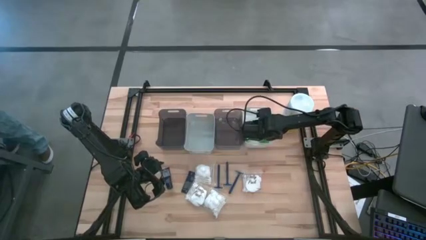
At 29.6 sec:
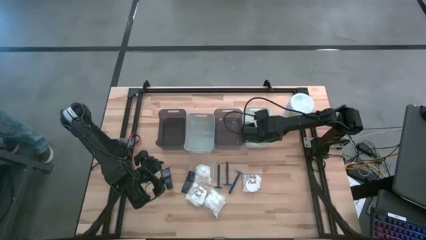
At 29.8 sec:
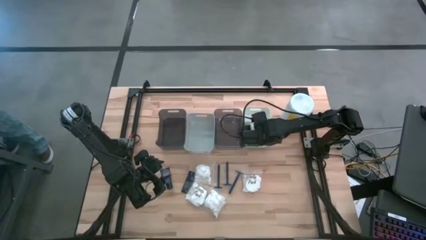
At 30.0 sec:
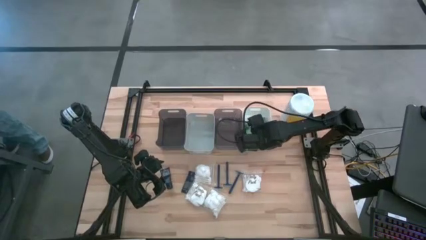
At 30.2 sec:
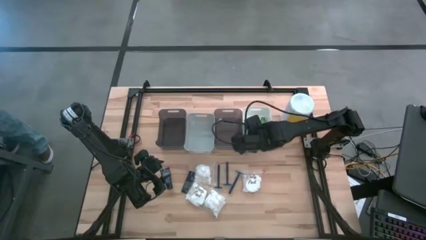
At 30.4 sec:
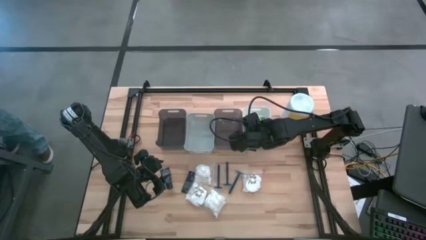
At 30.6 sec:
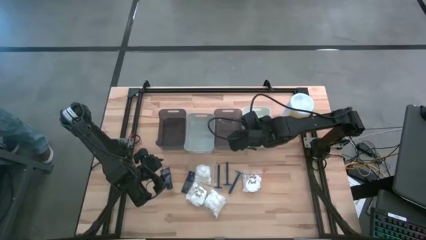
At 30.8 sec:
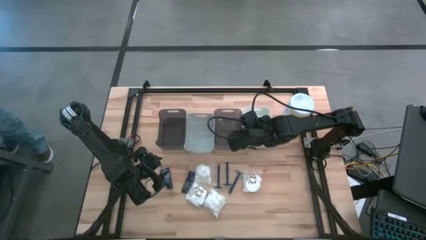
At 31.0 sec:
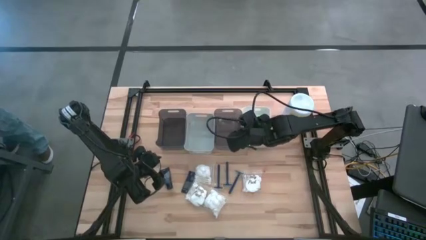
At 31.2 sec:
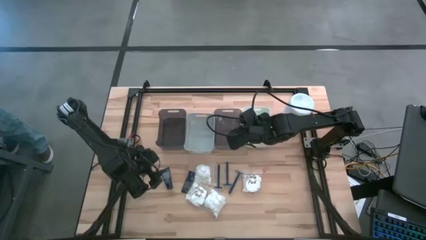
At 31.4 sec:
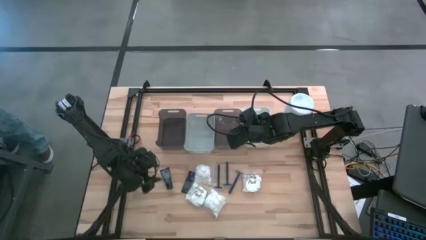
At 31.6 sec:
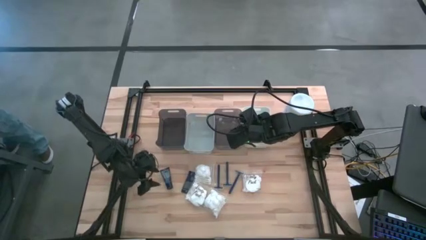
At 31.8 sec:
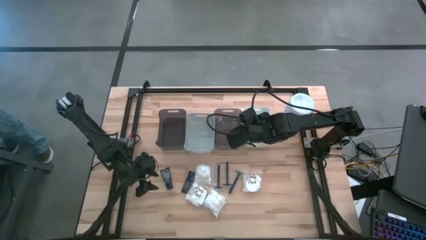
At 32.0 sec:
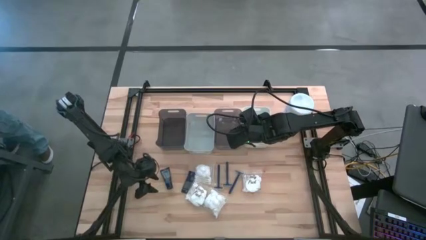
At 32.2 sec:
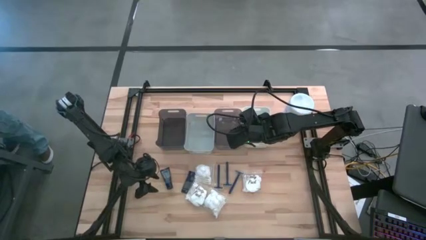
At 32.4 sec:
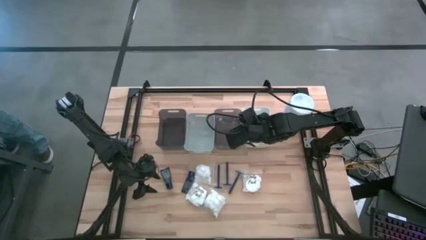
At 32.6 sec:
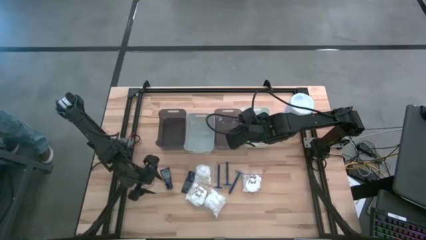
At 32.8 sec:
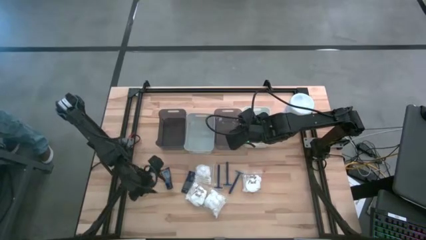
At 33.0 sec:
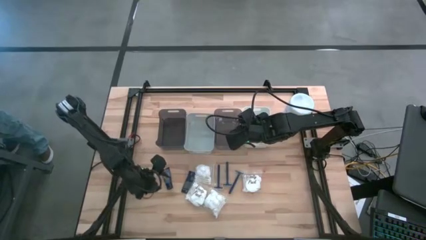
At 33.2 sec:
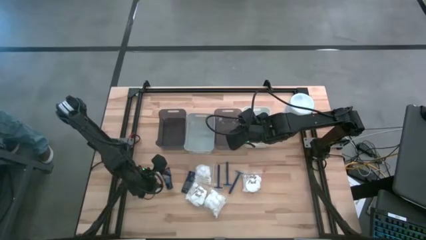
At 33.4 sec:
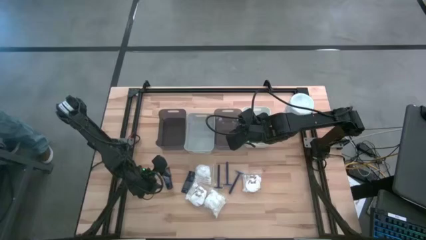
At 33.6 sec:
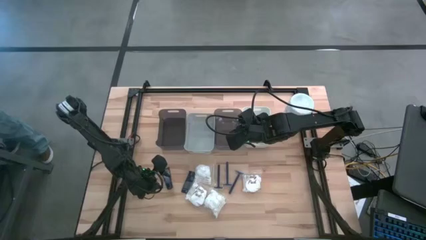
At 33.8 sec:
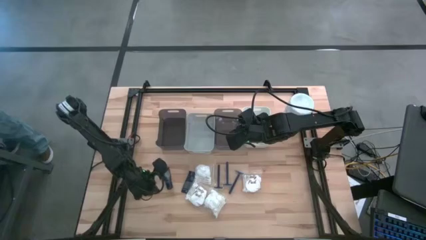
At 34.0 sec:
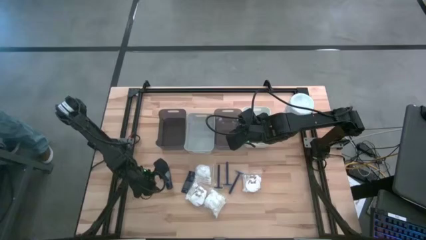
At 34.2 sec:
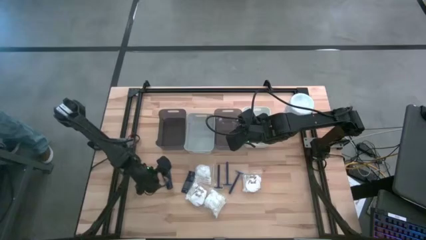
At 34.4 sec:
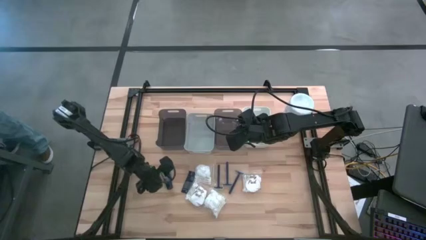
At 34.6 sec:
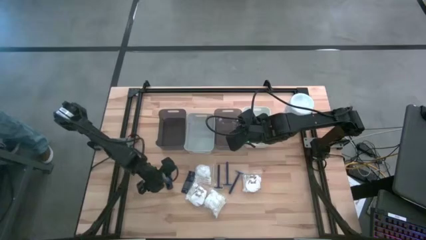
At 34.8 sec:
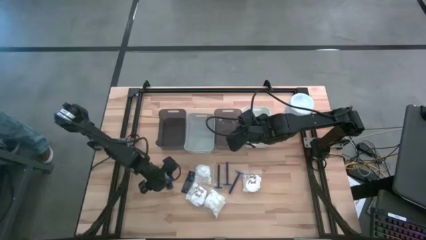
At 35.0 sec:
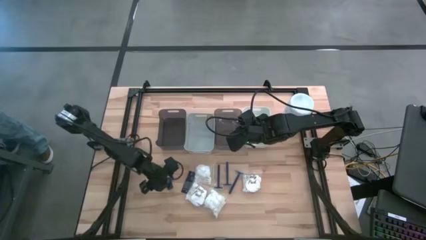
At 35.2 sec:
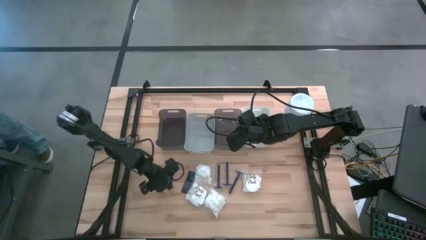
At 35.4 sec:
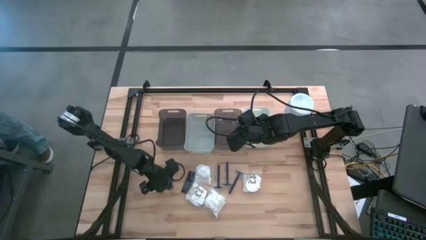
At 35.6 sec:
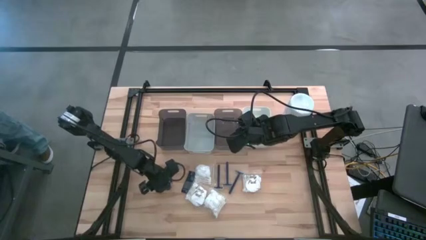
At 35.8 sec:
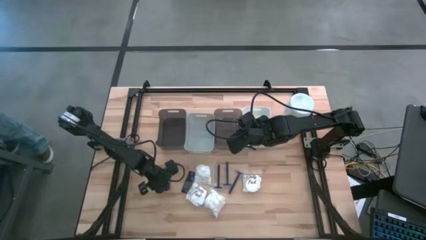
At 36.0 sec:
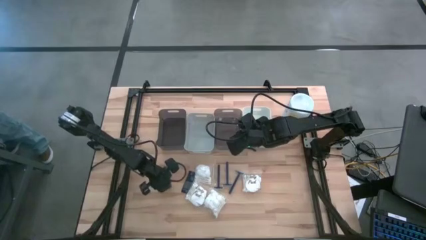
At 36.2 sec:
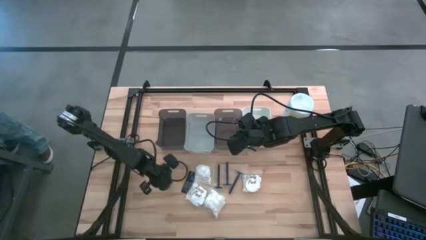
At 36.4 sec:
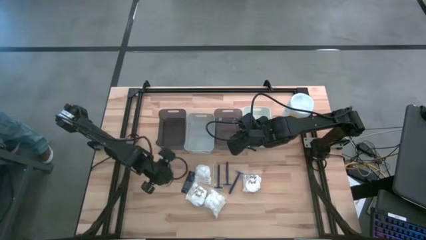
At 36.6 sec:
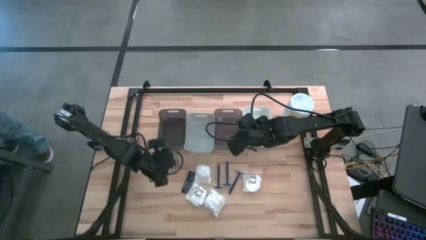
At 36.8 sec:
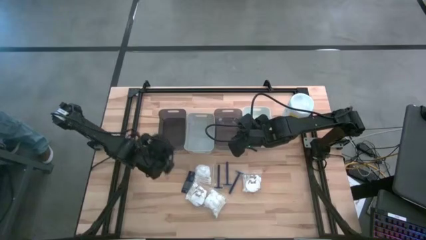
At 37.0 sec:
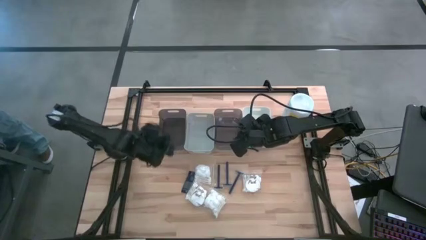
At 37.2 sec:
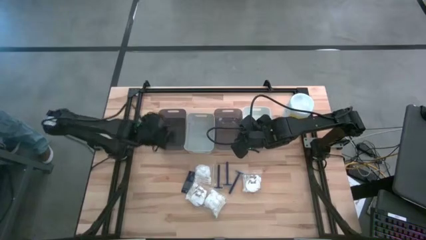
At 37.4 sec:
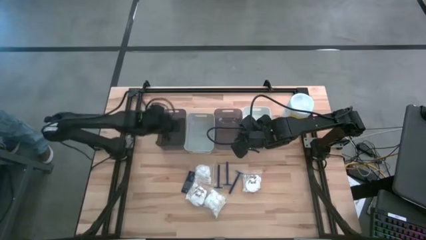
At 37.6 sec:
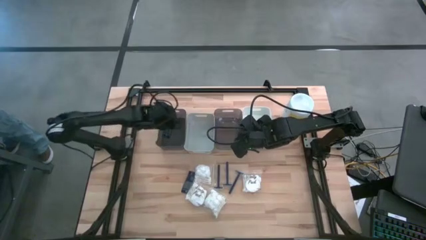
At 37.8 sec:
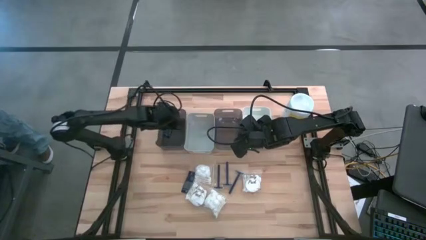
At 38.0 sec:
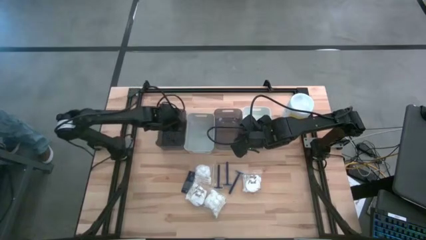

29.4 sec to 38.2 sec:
Task: Pick & Place Travel size toiletries
Put the blue shave cream into the left black bin

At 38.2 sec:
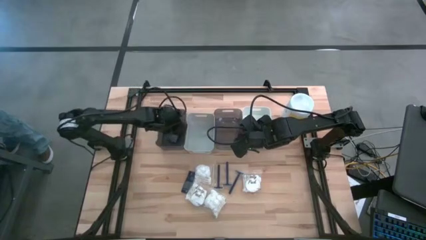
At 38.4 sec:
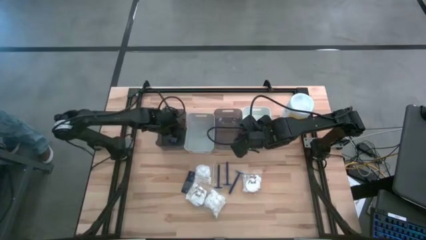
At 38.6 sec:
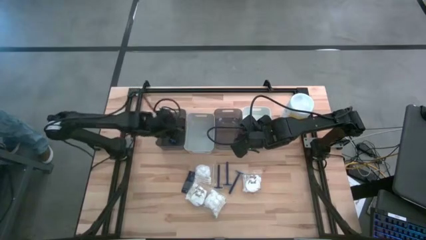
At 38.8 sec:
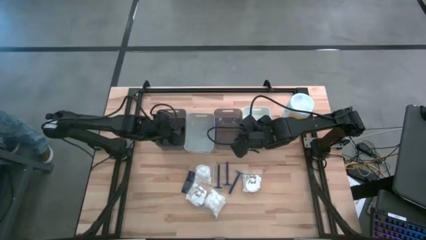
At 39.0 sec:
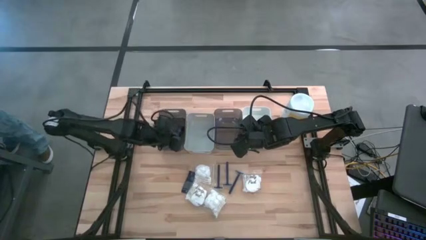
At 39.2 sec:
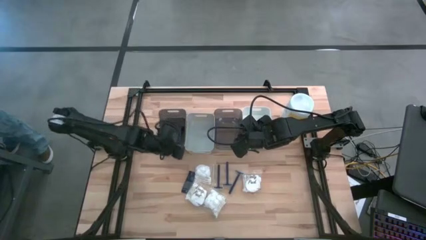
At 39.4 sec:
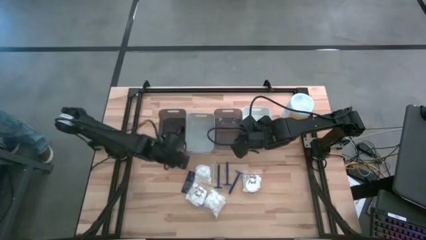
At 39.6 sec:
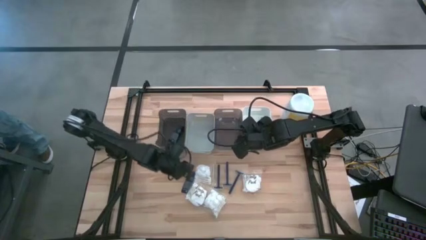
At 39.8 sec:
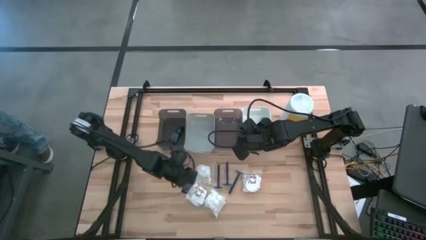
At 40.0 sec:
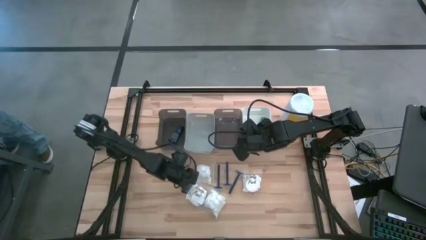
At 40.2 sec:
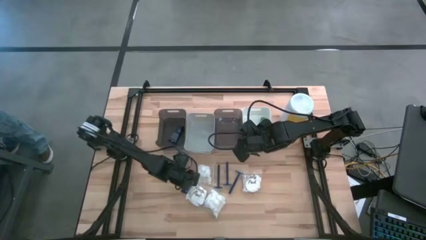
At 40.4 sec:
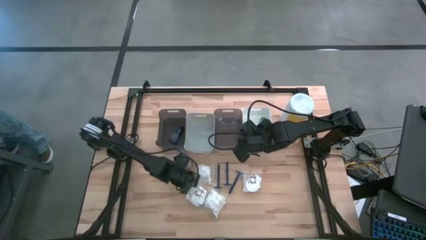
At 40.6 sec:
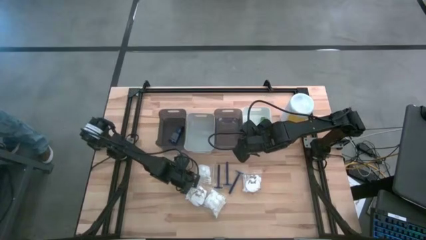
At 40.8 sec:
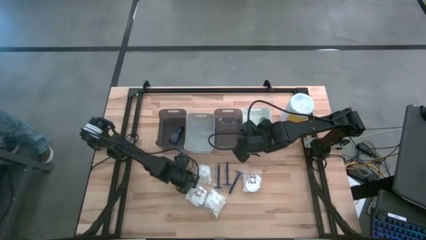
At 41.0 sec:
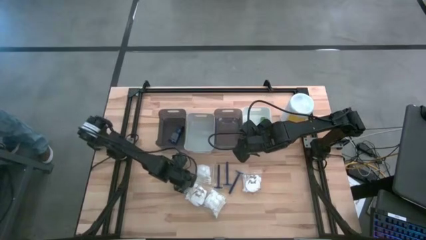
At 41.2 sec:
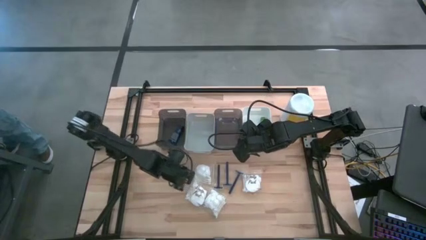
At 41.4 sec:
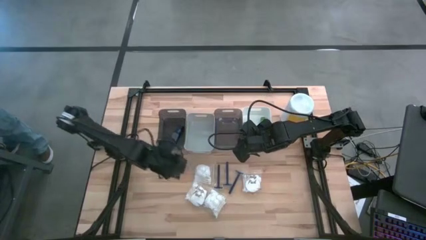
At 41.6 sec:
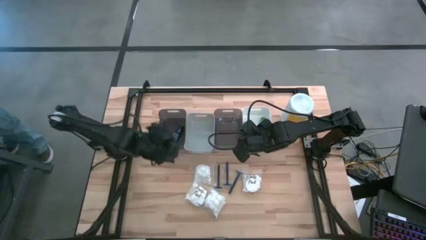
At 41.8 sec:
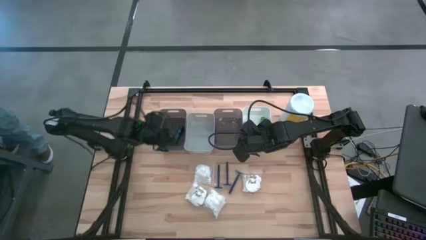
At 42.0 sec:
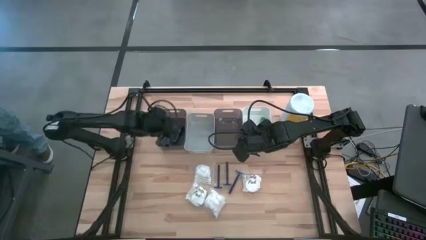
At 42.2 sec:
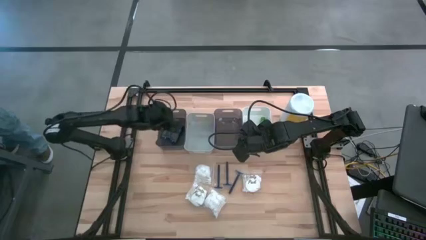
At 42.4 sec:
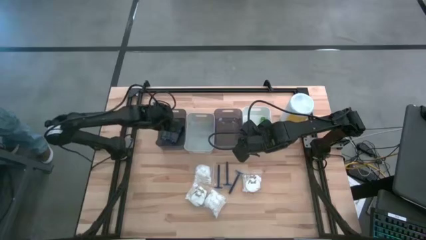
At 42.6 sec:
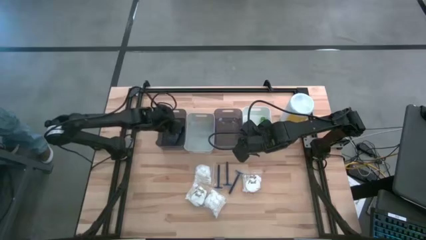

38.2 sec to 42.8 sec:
Put the blue shave cream into the left black bin

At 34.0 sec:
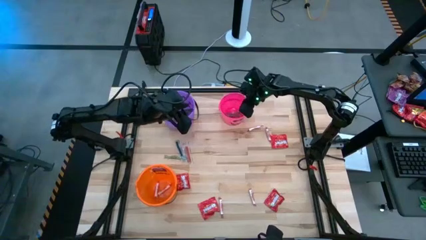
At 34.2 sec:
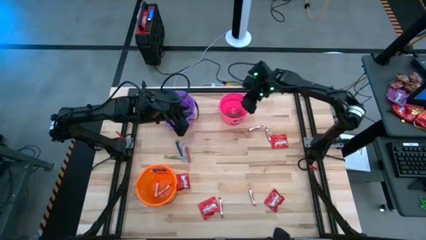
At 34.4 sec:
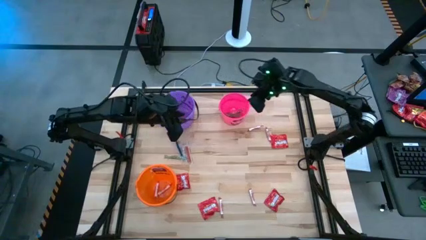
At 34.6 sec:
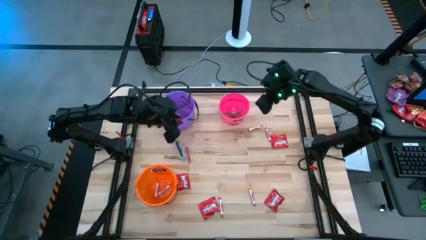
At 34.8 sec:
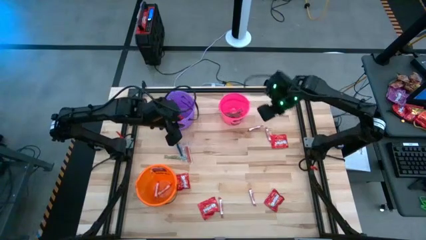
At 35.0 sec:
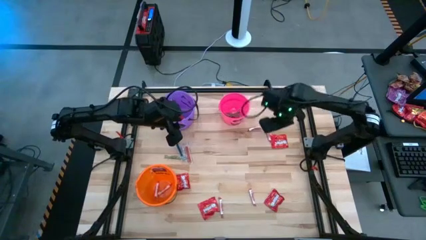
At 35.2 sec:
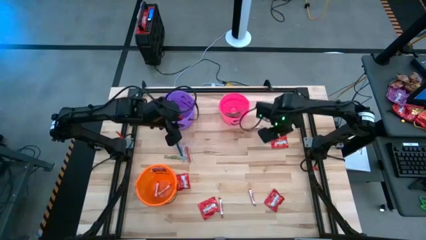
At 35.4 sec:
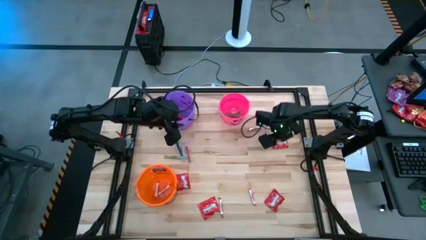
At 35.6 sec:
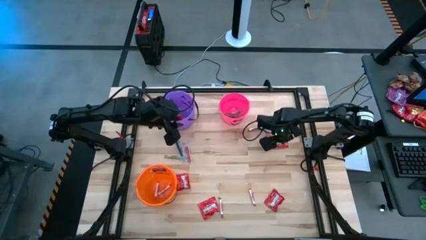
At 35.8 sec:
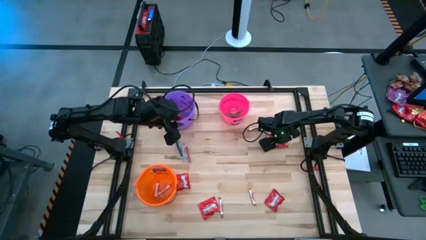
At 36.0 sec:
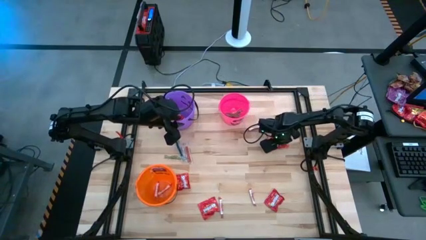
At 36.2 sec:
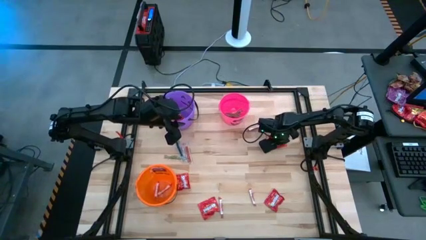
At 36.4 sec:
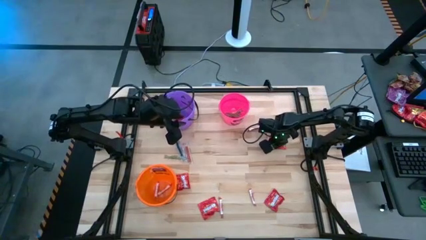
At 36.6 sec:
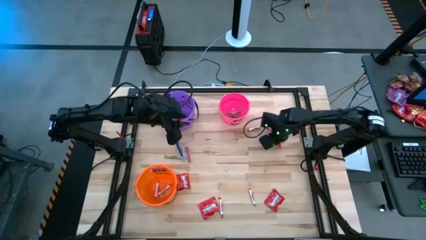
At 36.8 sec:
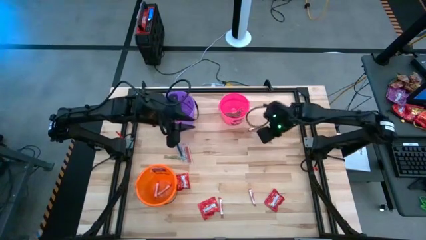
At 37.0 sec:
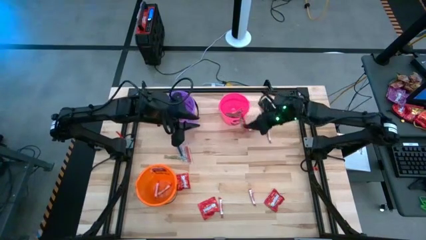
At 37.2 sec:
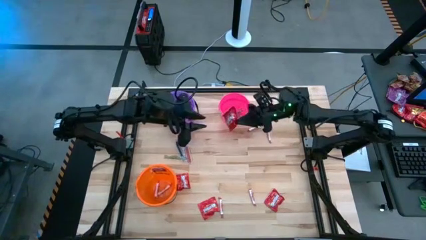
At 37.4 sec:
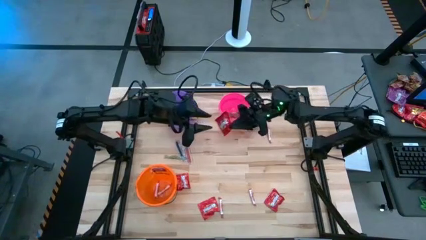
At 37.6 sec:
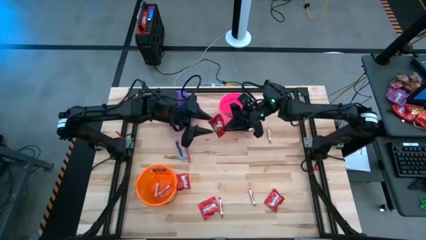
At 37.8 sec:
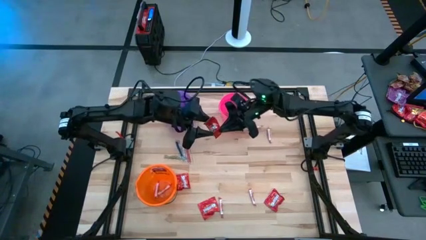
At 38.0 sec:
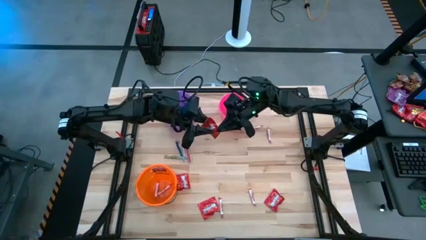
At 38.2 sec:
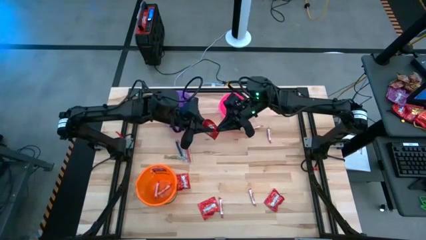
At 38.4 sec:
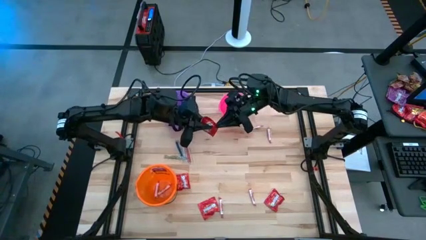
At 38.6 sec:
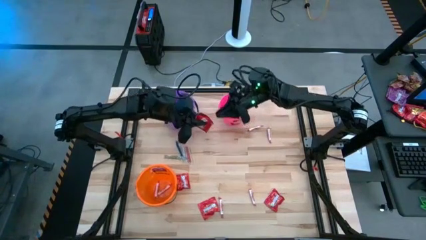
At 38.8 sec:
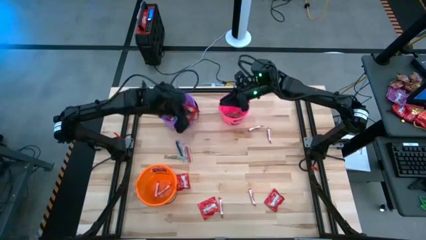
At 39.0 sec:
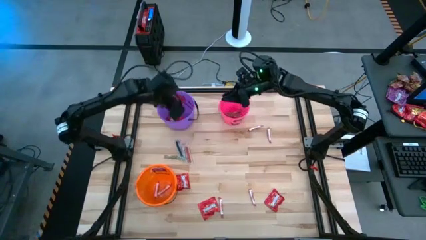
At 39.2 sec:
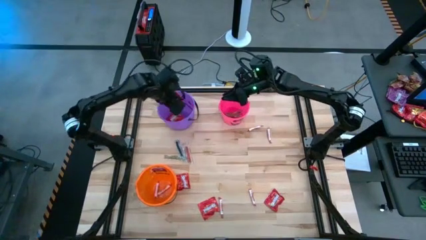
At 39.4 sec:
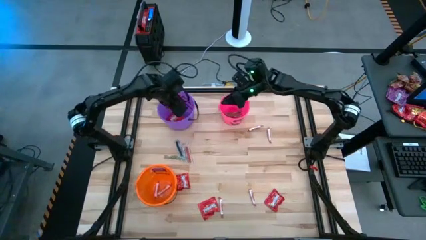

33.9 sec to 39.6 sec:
Task: Sort candy by brand, put in halloween buckets
Put the red candy into the purple bucket
